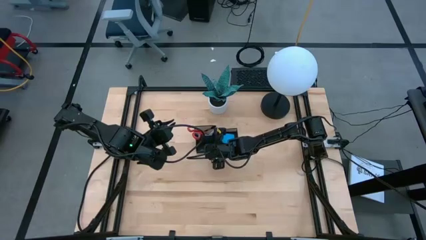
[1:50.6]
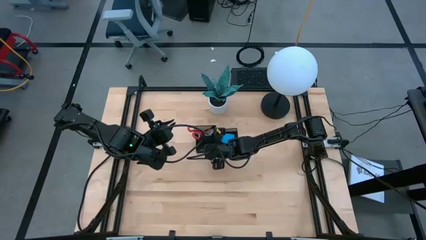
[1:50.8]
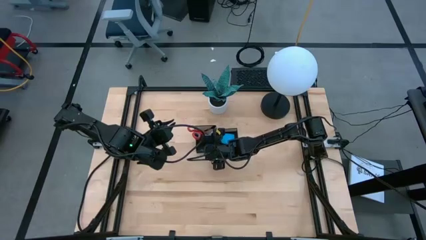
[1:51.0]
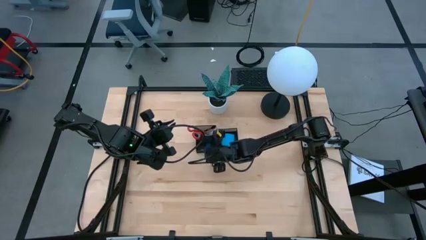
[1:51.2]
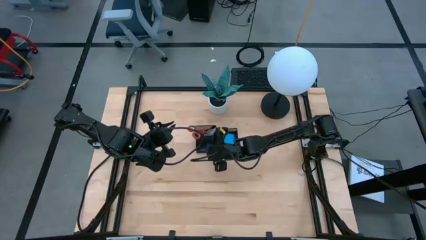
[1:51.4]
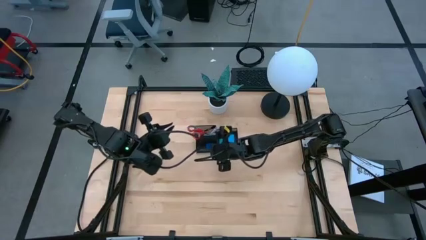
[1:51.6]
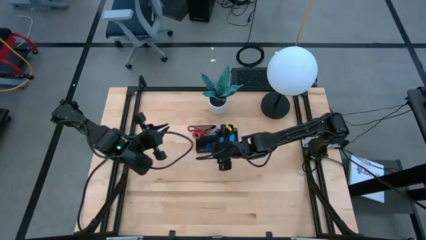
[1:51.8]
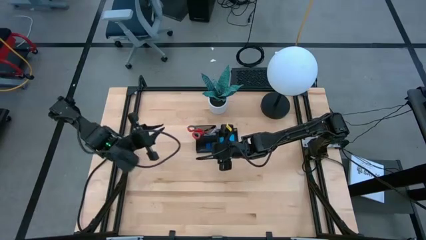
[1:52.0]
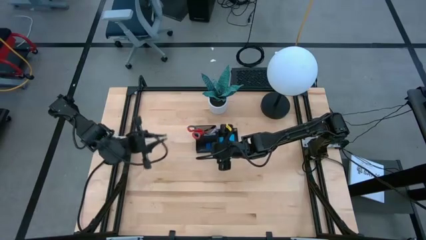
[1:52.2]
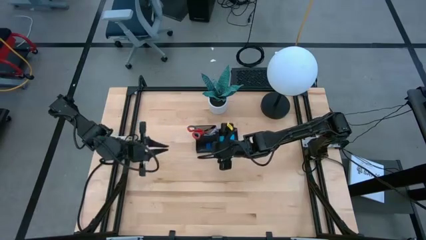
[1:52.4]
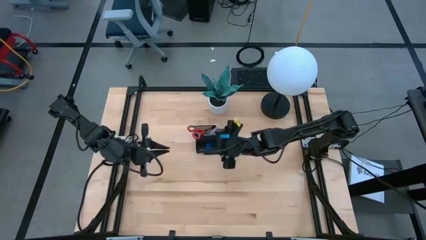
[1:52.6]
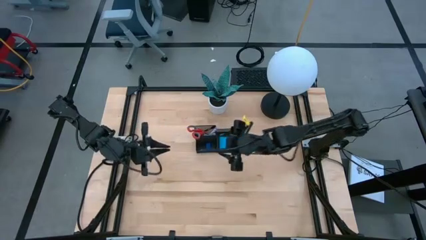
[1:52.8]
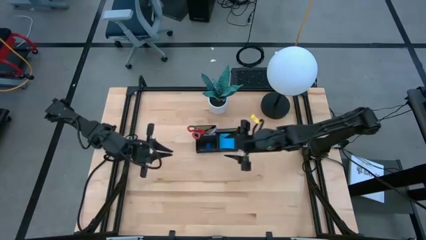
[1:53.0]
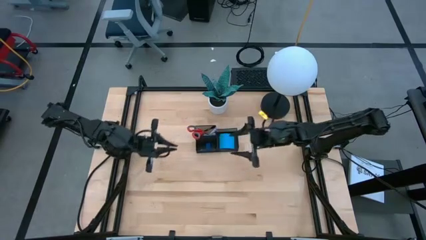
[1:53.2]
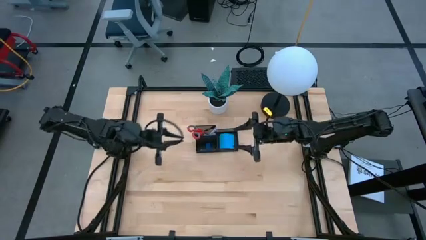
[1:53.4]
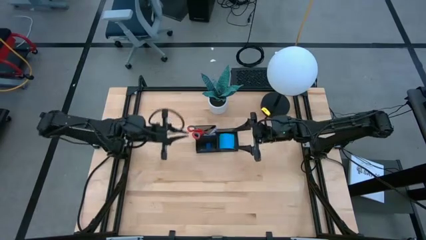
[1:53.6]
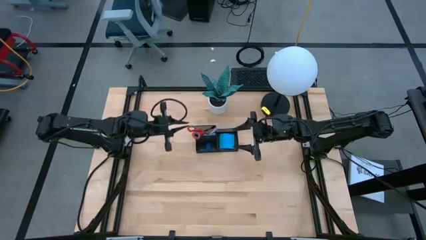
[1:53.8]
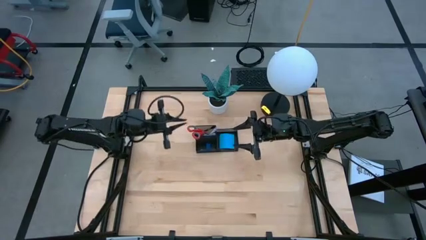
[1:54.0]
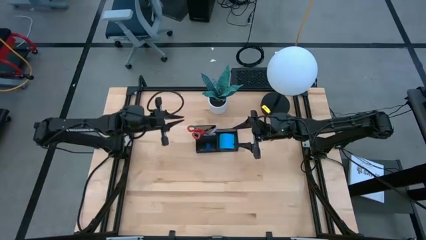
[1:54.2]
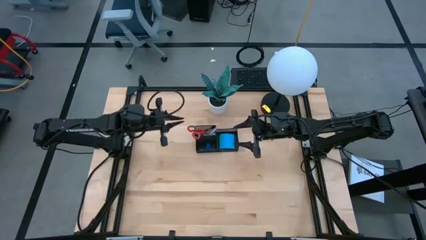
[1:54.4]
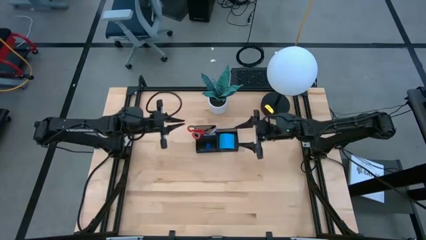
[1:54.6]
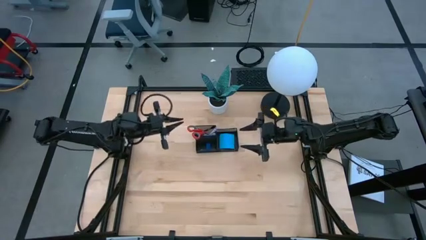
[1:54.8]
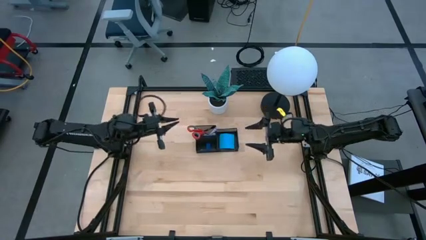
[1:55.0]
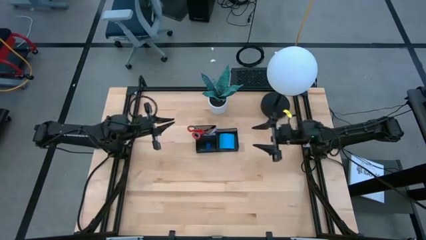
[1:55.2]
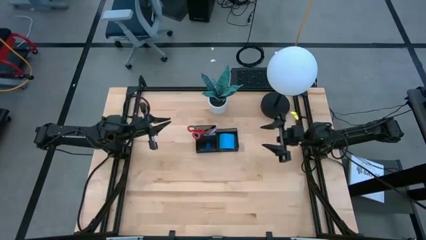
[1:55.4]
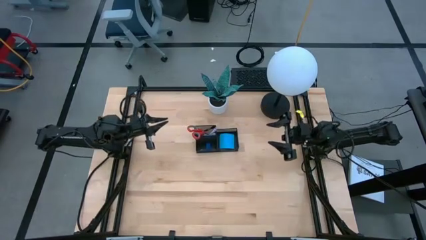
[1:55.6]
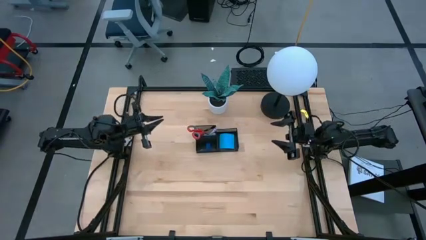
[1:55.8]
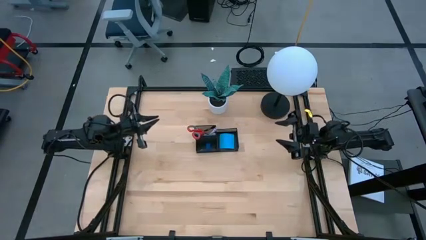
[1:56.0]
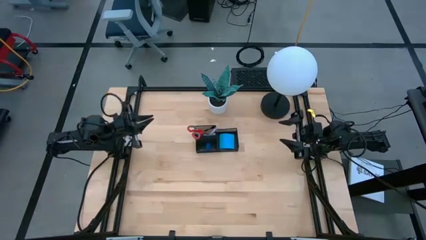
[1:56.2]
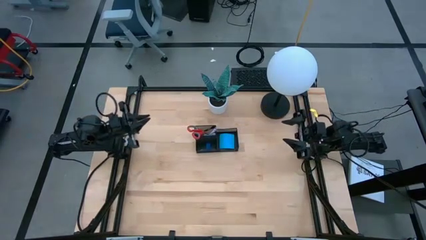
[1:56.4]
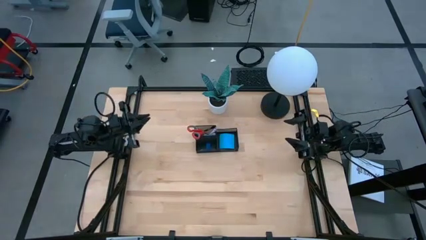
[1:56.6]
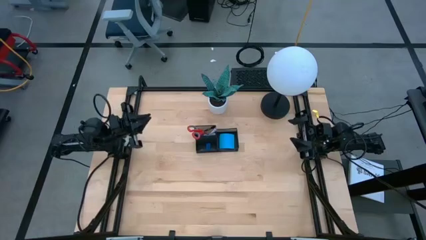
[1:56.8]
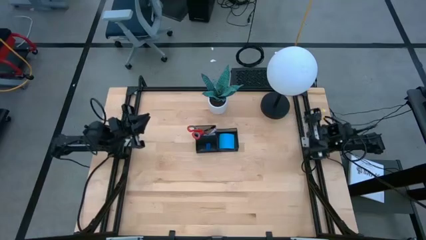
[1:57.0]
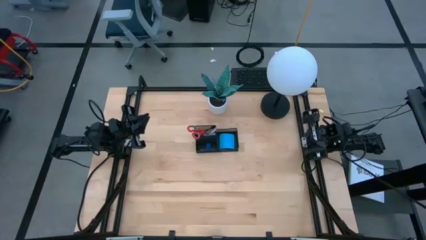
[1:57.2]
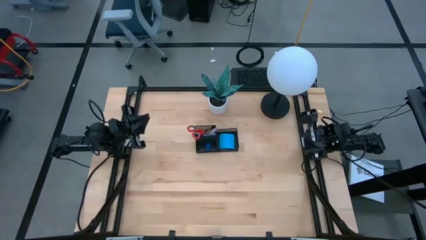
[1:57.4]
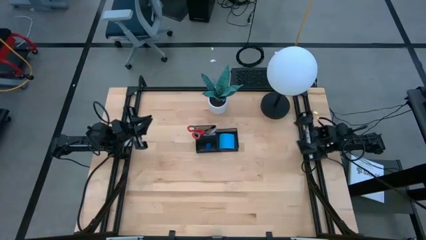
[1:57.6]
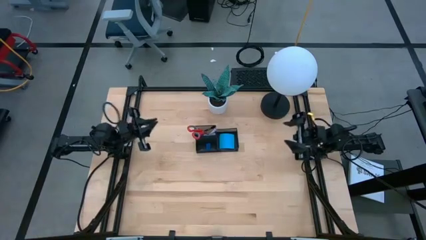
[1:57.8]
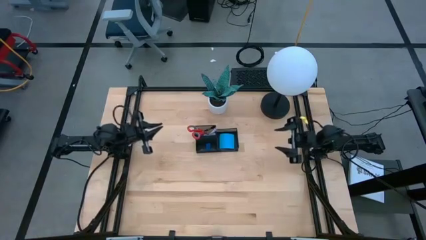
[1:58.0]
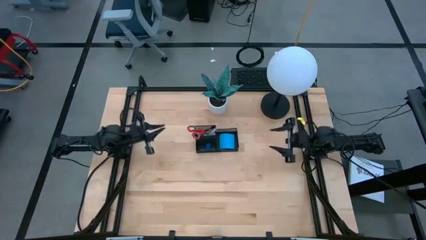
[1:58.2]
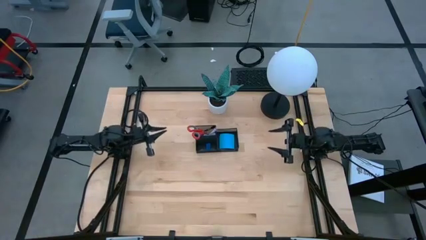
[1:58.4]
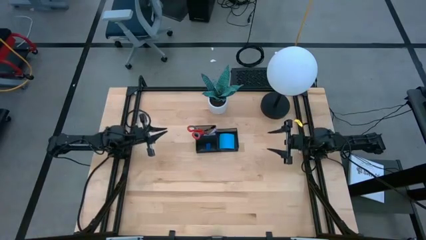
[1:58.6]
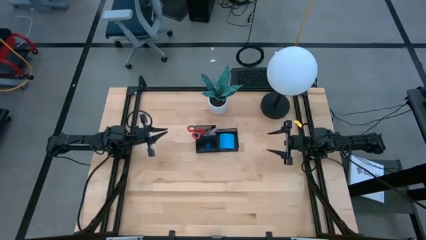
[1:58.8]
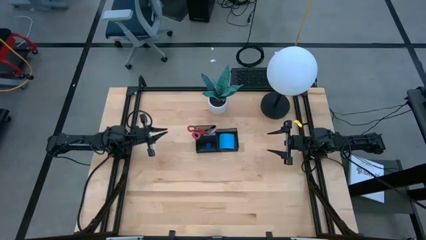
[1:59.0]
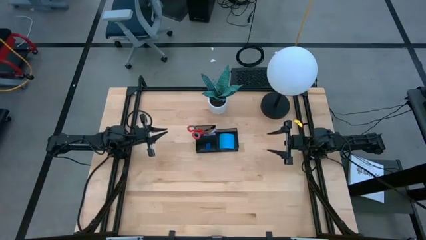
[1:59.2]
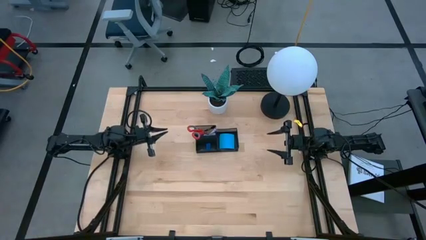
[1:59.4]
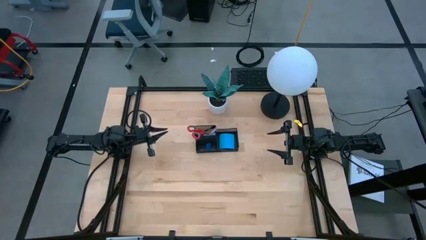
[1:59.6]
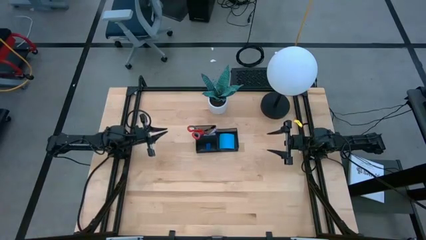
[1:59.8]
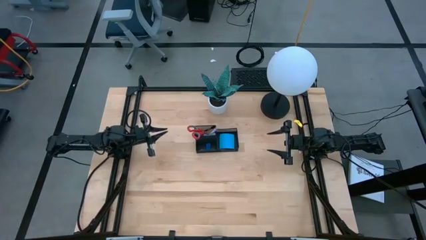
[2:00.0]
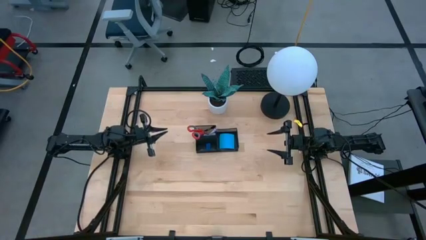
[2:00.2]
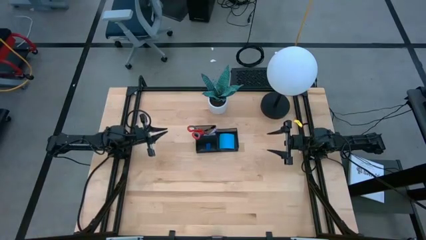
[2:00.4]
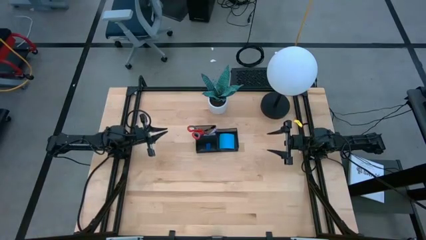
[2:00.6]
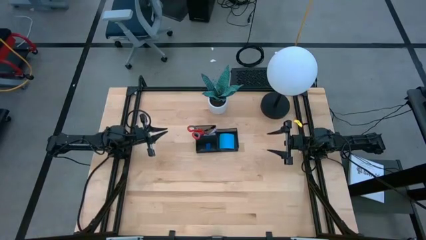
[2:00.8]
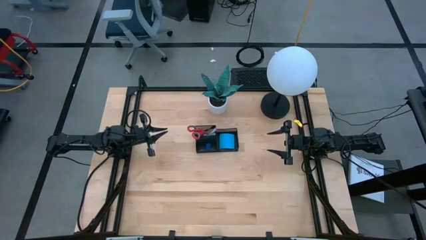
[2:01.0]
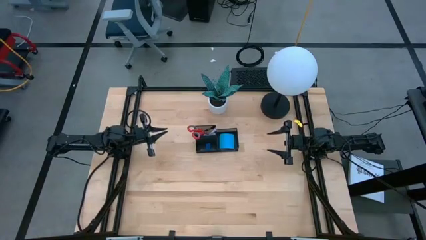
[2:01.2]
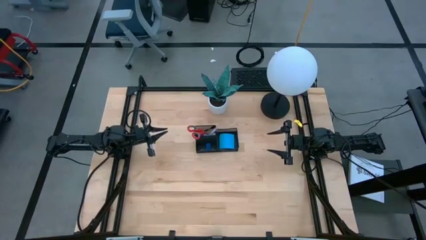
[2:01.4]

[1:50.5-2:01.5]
Task: Pick and place office supplies into organizer
Return to Home Position
